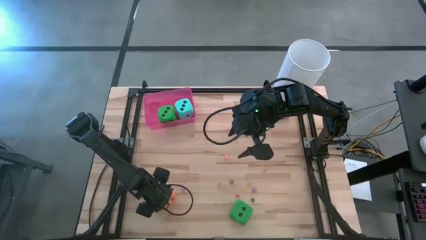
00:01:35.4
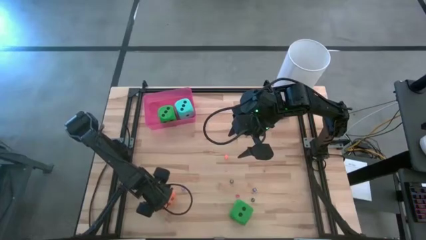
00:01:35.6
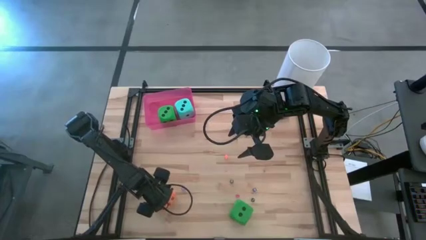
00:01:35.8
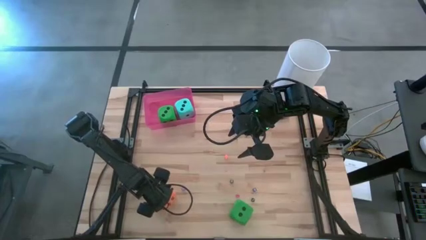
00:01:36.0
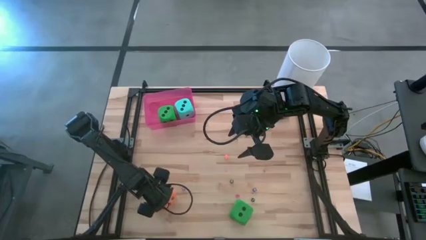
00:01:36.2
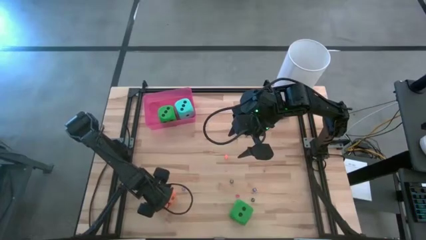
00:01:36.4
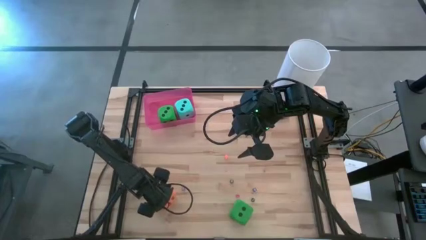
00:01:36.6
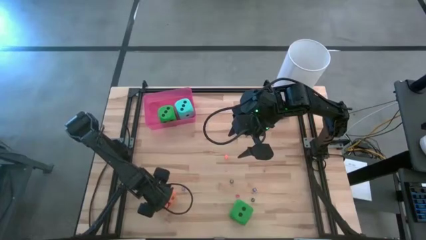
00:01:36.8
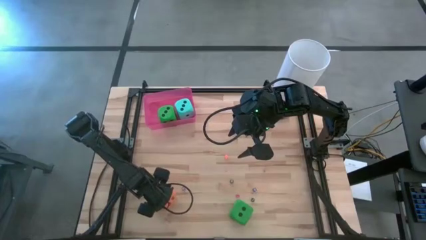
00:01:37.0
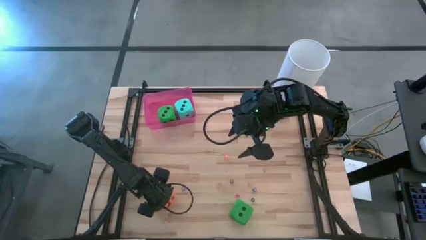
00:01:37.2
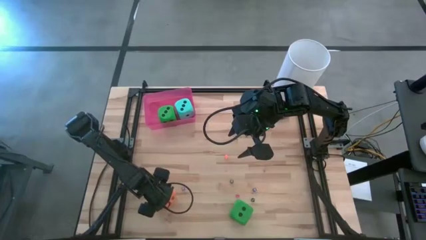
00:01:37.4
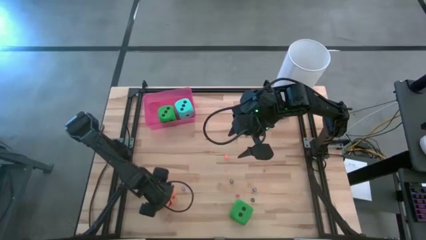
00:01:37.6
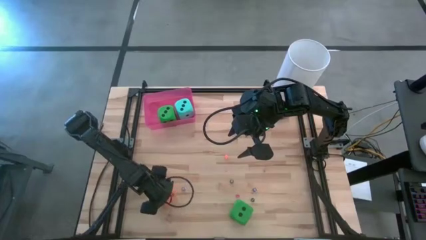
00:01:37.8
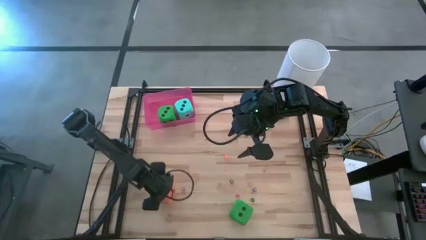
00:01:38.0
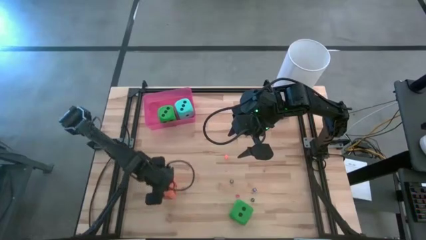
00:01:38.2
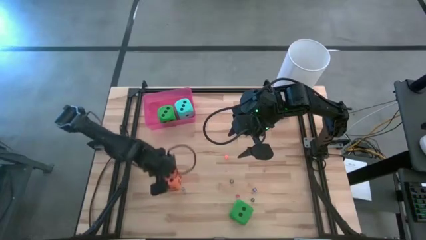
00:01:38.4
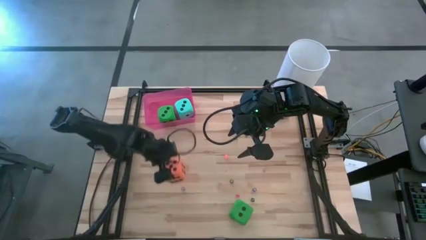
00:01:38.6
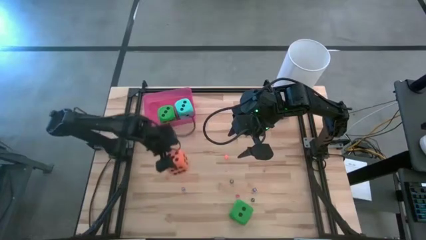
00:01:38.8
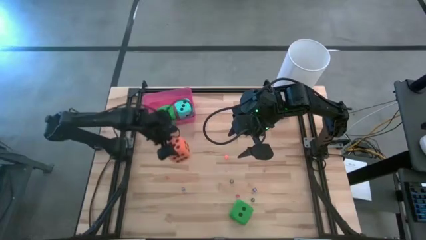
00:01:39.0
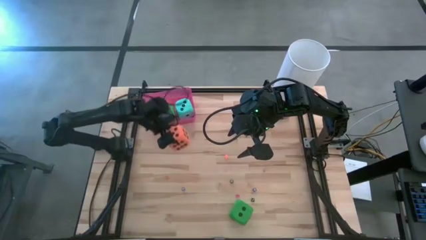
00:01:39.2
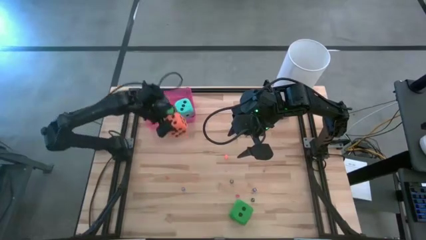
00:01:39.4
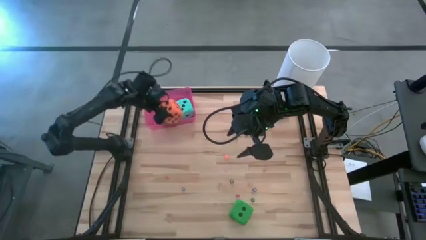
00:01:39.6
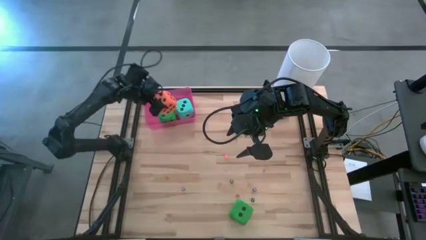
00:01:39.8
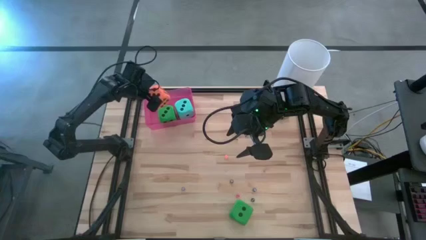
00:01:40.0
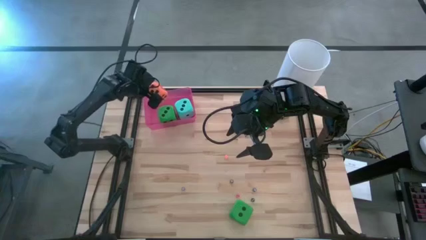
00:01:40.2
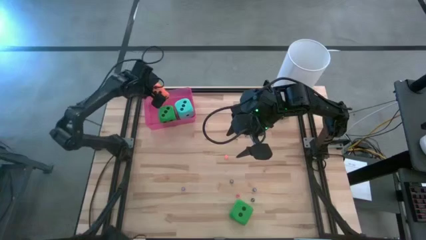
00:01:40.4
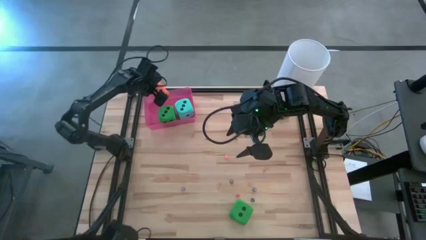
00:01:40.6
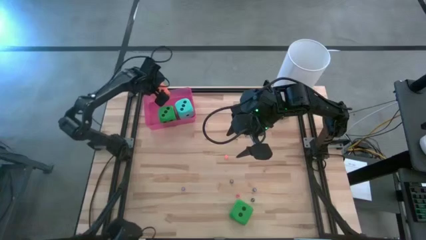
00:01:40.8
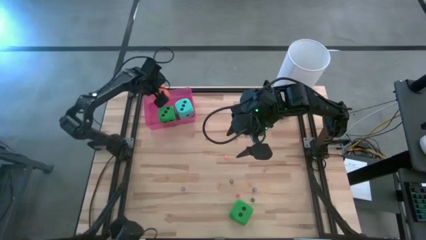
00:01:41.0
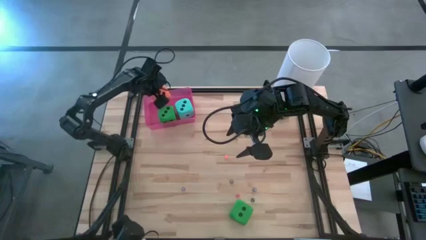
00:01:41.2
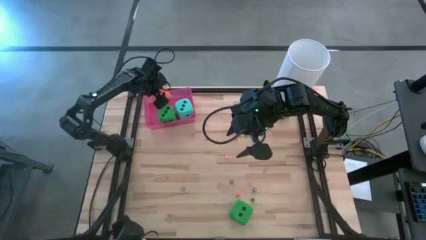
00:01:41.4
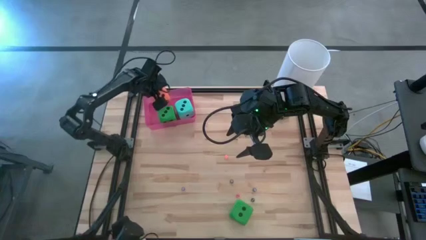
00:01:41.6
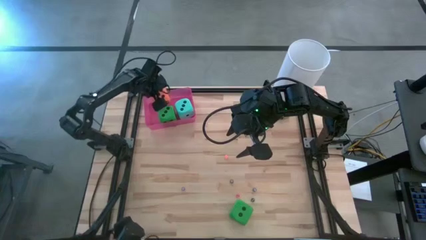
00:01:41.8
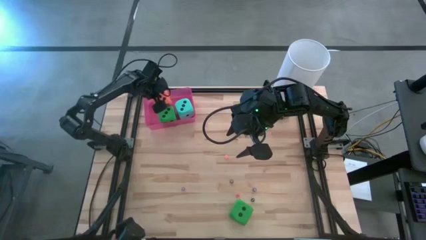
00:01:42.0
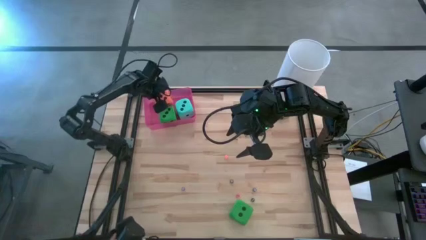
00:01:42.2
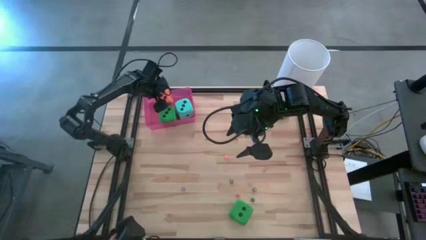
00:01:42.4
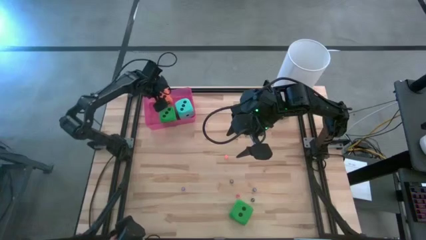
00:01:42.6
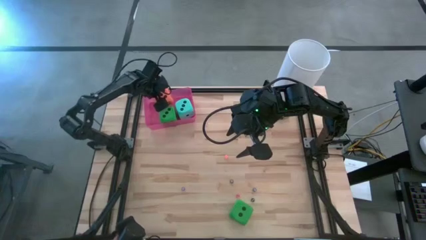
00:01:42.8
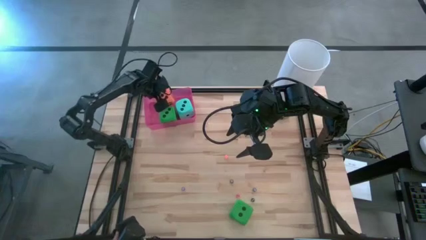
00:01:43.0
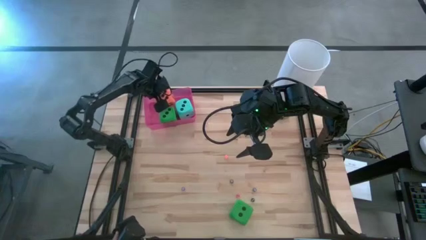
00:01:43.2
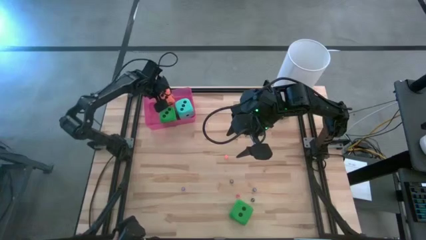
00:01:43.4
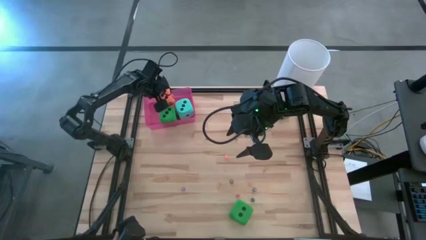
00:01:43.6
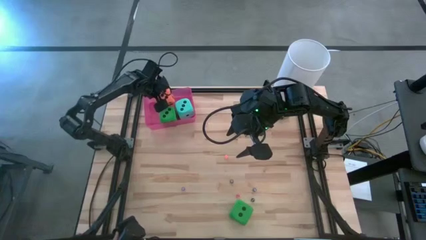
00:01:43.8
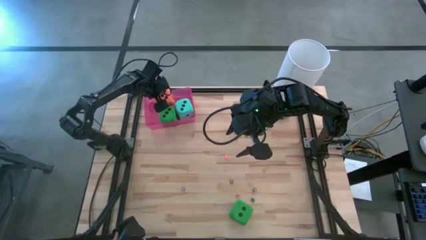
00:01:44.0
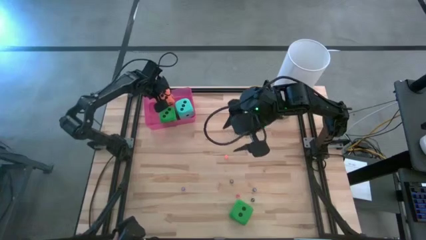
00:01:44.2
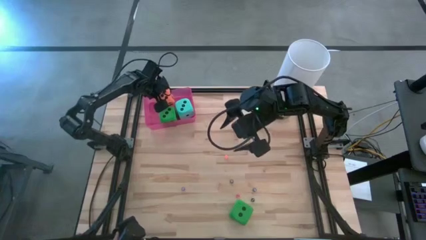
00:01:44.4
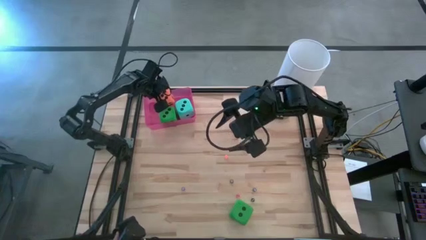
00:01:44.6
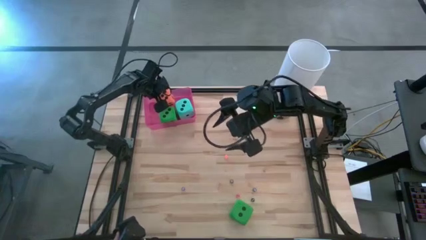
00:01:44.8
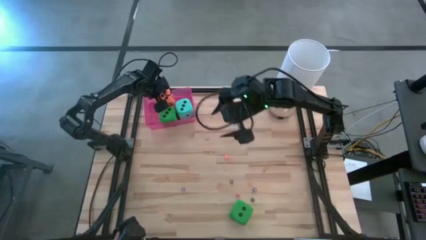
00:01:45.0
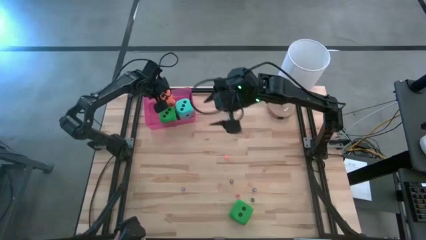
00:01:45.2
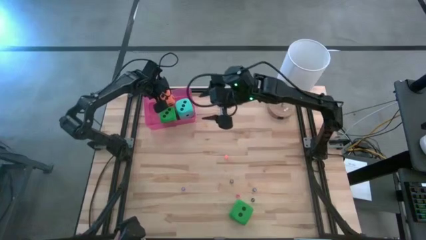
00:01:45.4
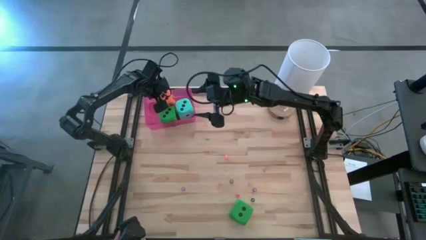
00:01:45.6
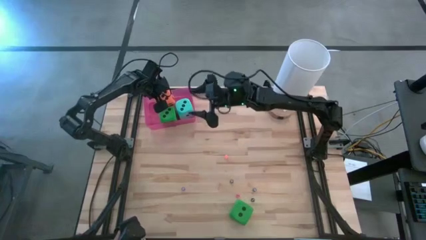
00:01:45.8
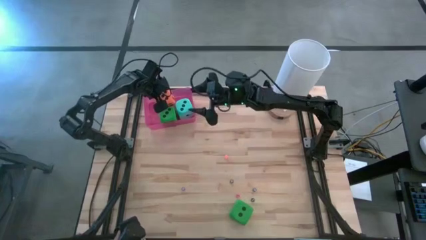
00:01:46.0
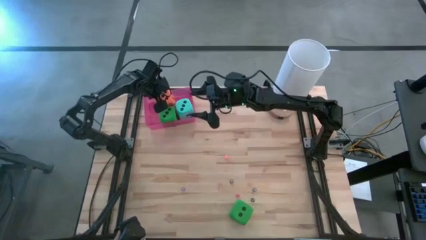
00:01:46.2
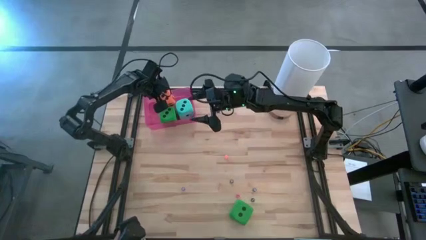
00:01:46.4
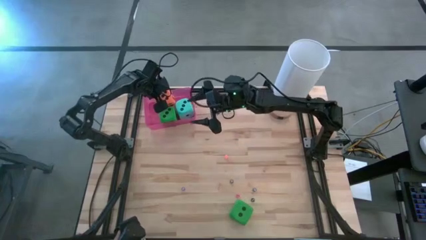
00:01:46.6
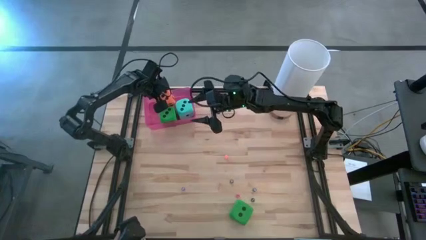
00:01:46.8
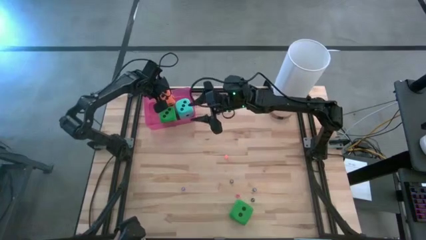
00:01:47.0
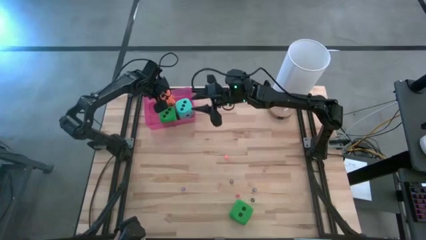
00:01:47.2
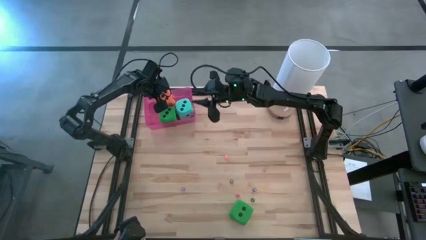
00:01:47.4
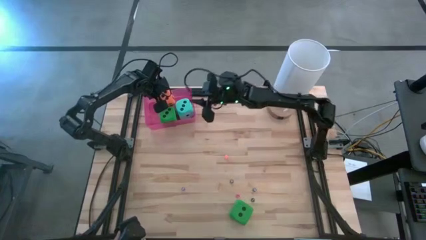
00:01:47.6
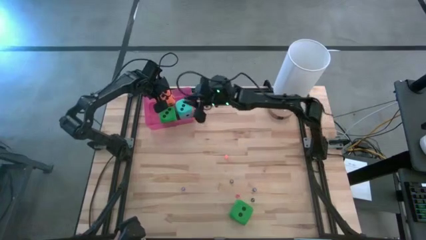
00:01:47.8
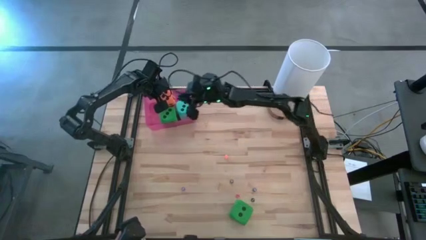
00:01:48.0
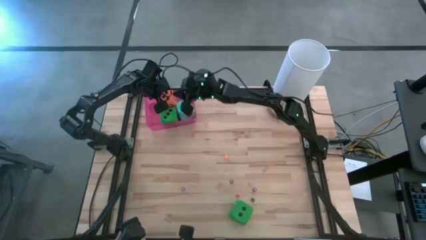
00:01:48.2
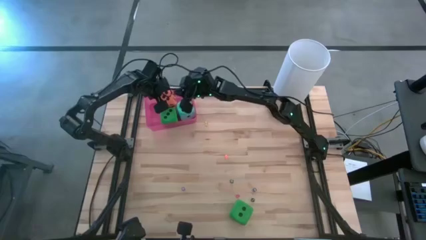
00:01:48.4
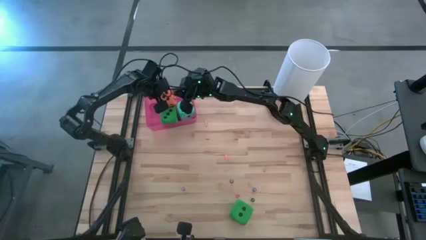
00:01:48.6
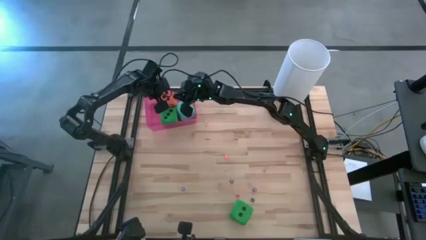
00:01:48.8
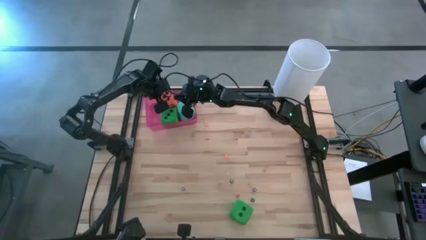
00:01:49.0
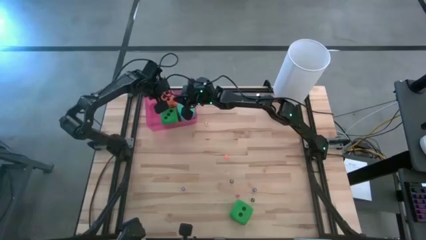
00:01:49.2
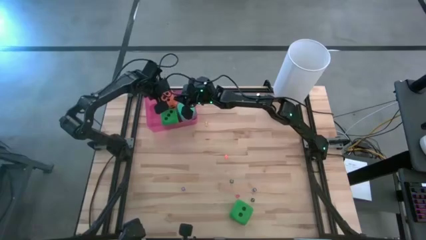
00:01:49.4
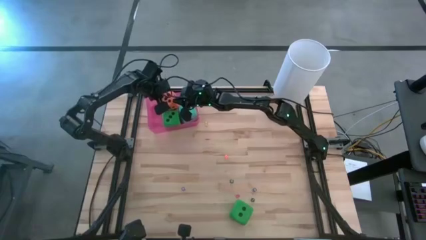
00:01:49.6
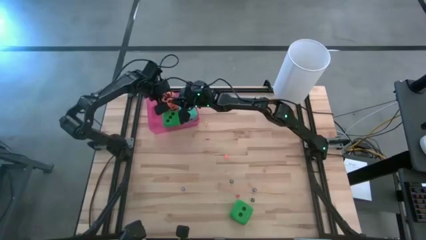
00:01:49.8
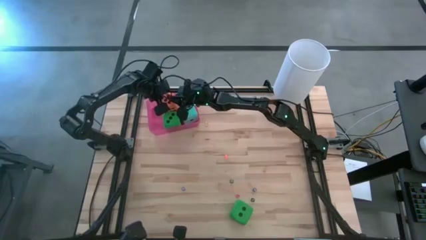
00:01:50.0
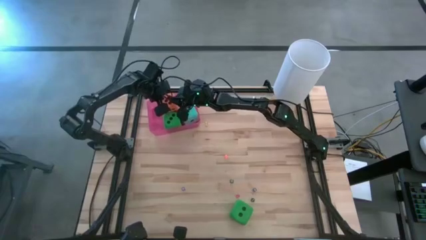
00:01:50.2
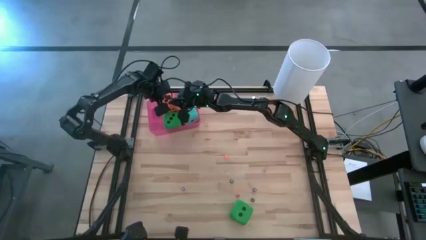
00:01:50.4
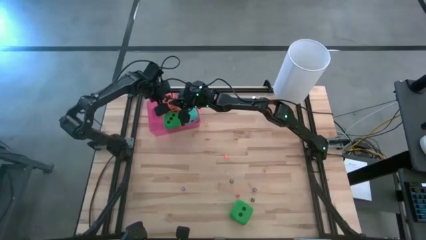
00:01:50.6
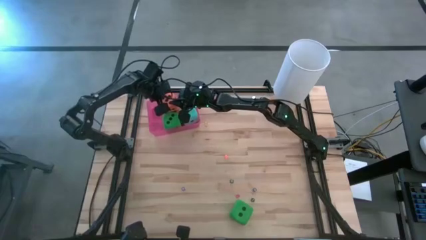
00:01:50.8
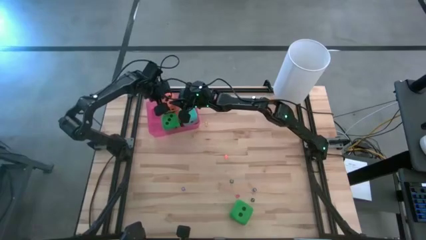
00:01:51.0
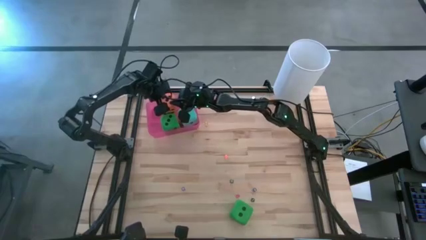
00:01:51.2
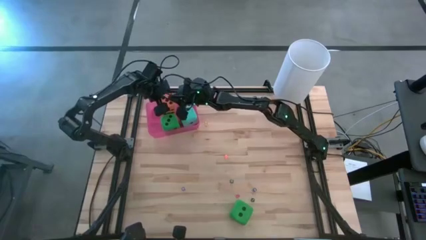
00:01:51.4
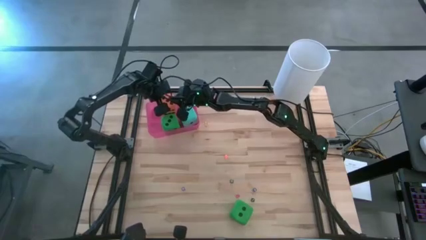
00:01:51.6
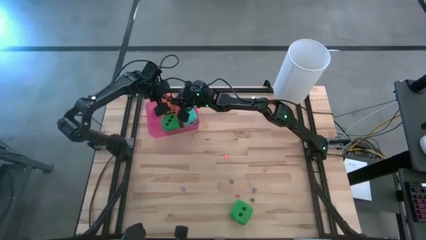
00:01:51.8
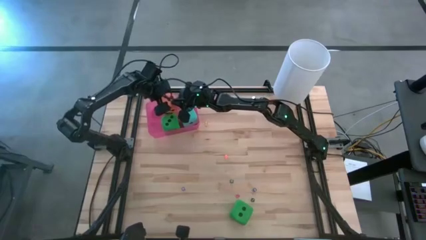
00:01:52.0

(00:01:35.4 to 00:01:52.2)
Task: Pick & Place Dice
Put the big orange dice into the red bin
